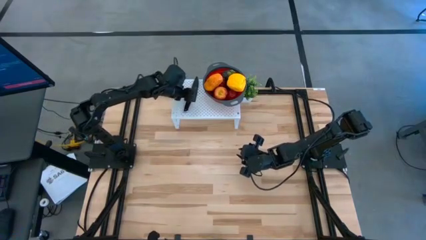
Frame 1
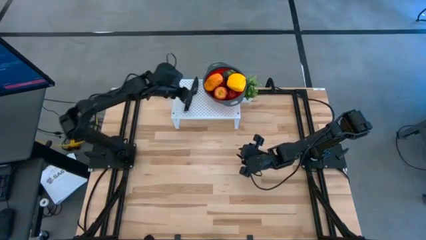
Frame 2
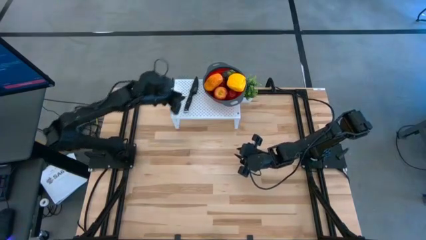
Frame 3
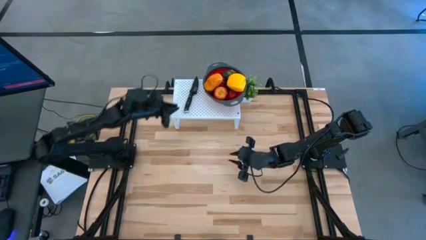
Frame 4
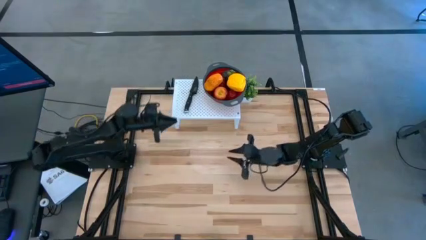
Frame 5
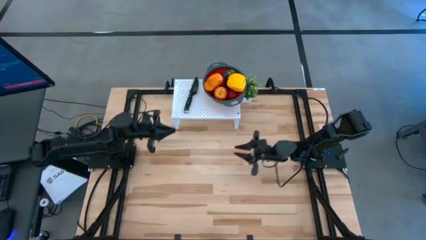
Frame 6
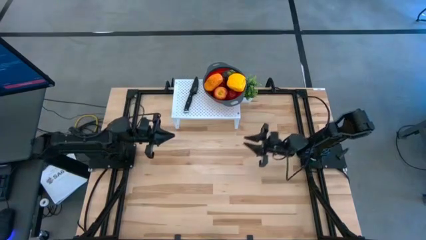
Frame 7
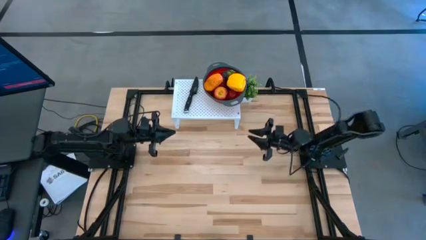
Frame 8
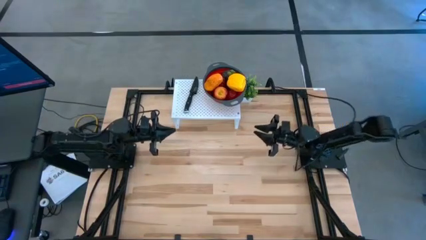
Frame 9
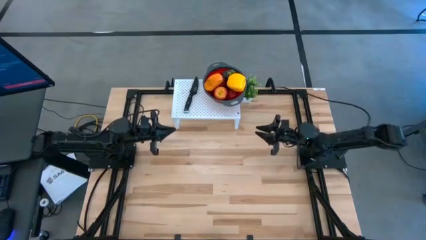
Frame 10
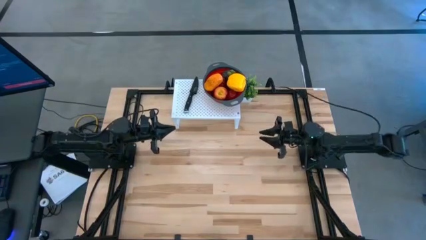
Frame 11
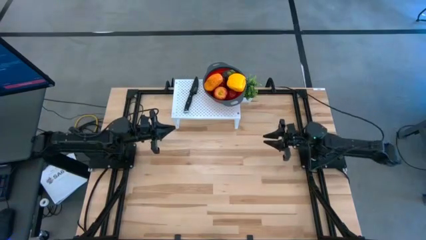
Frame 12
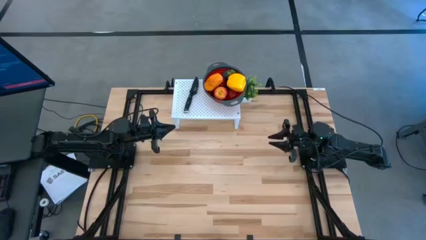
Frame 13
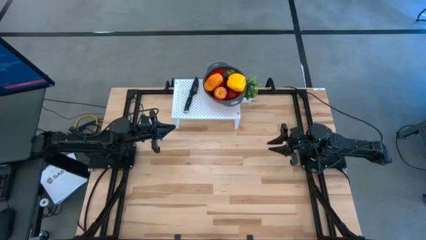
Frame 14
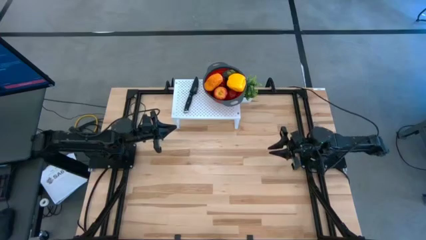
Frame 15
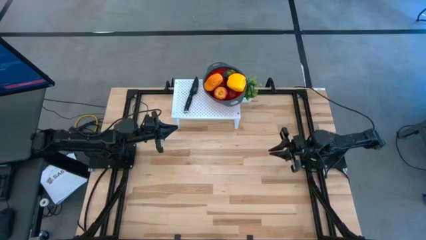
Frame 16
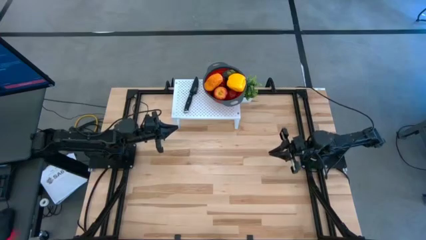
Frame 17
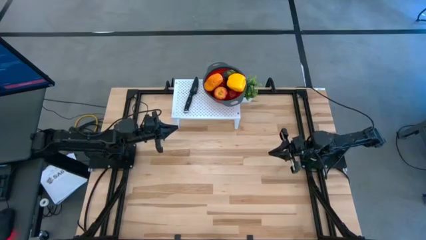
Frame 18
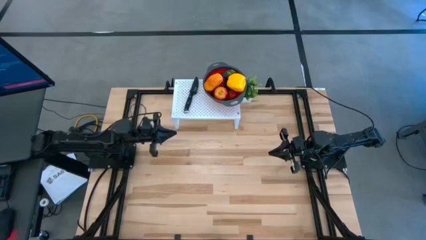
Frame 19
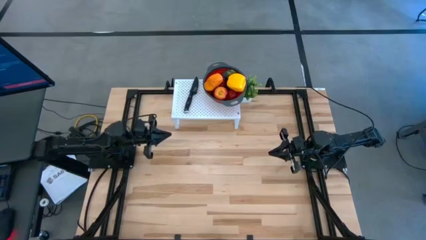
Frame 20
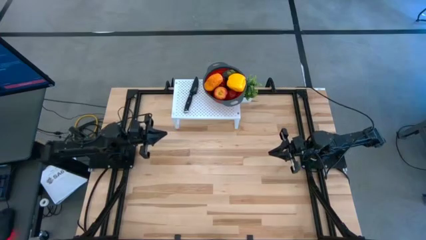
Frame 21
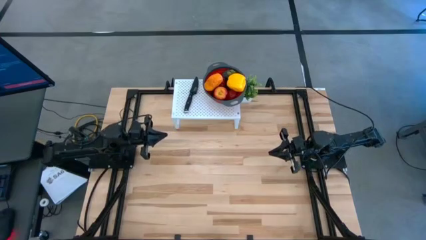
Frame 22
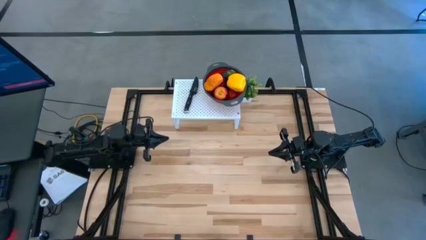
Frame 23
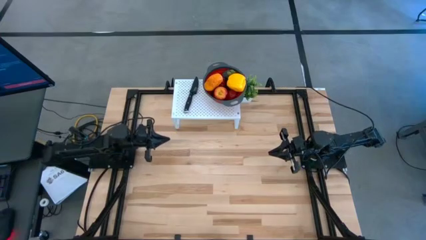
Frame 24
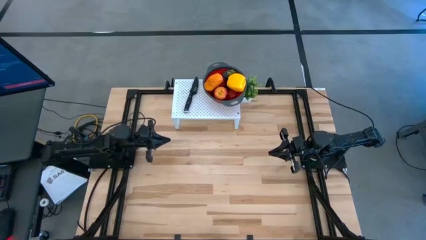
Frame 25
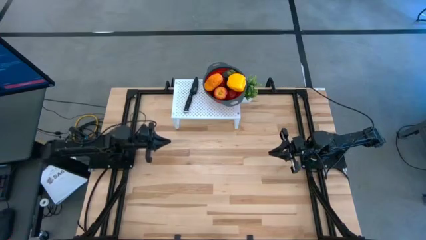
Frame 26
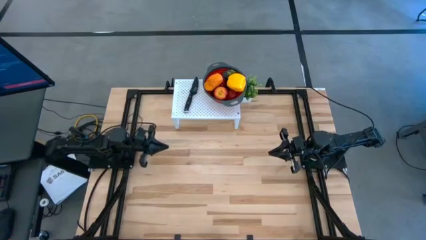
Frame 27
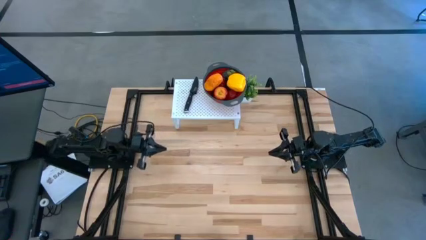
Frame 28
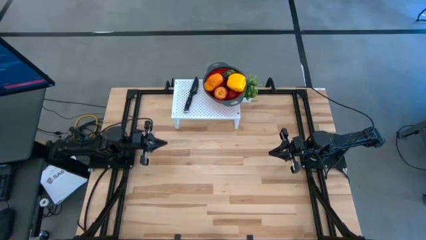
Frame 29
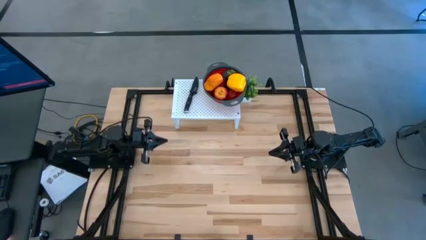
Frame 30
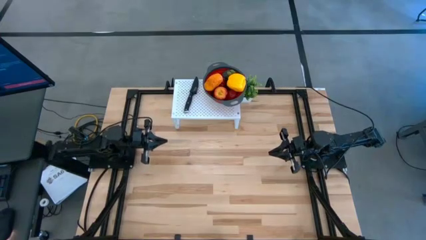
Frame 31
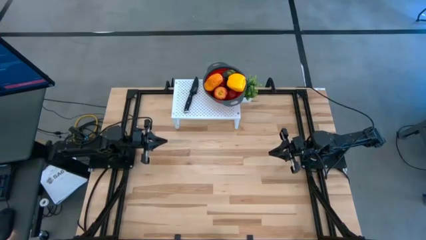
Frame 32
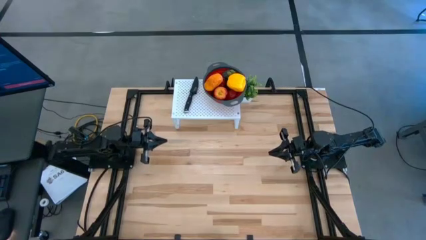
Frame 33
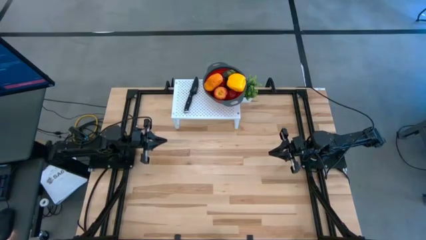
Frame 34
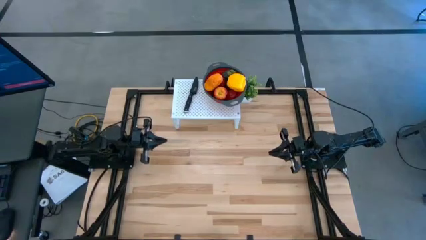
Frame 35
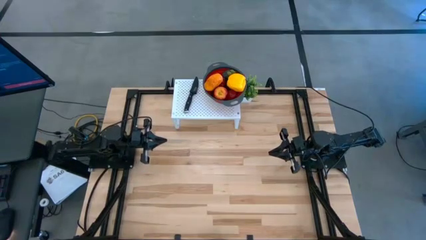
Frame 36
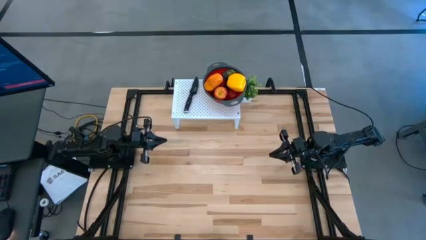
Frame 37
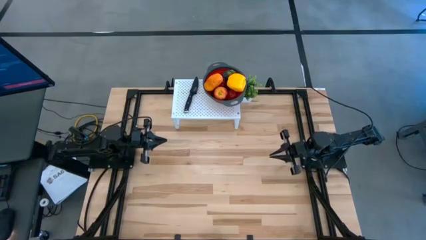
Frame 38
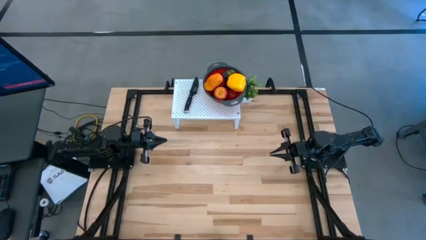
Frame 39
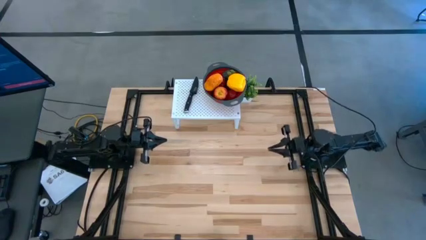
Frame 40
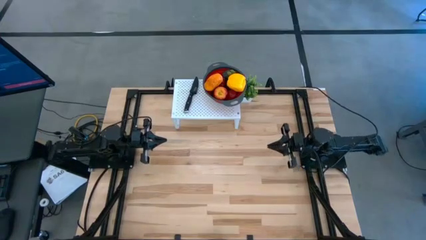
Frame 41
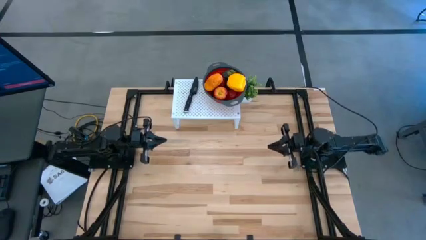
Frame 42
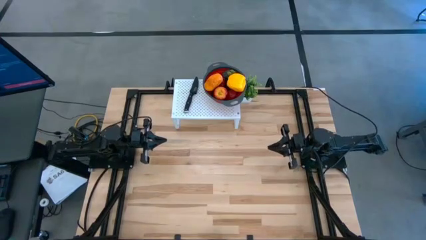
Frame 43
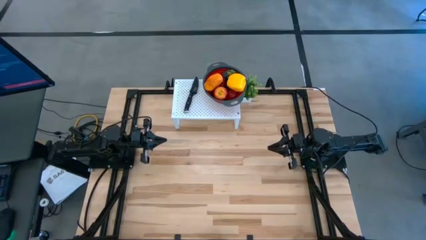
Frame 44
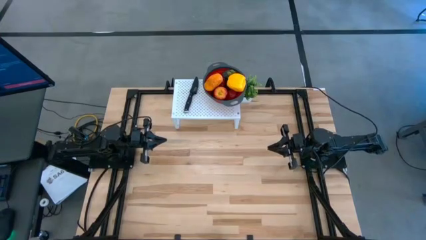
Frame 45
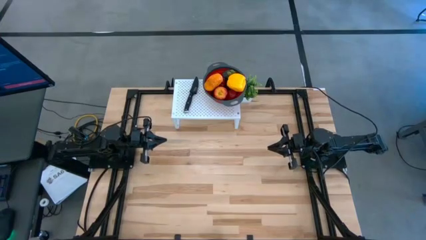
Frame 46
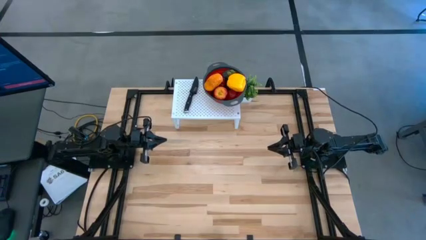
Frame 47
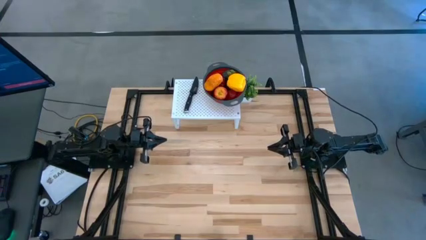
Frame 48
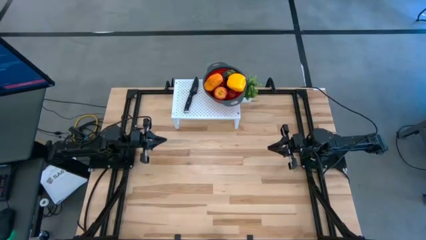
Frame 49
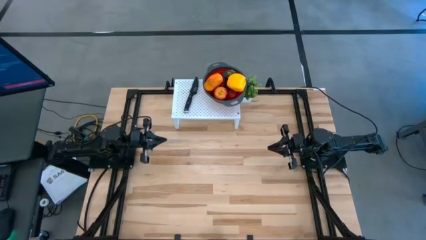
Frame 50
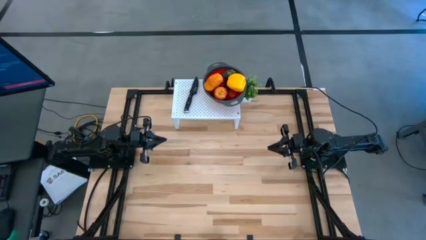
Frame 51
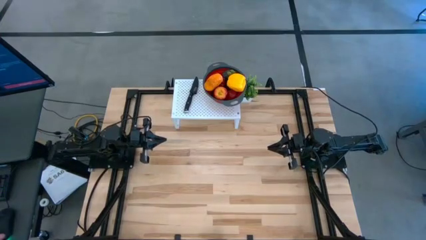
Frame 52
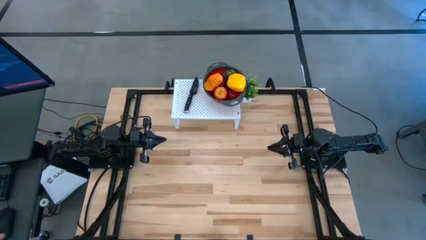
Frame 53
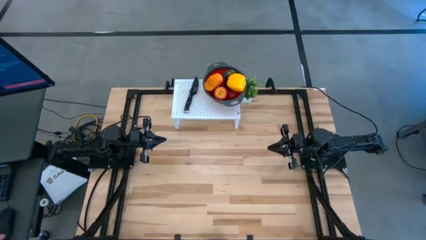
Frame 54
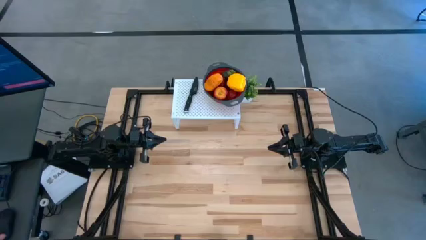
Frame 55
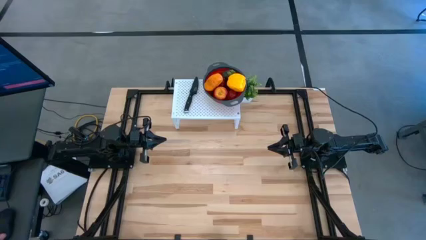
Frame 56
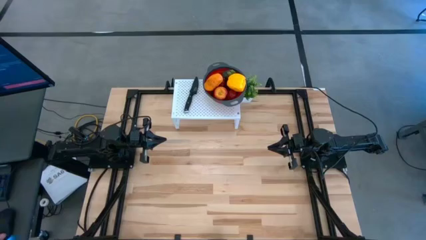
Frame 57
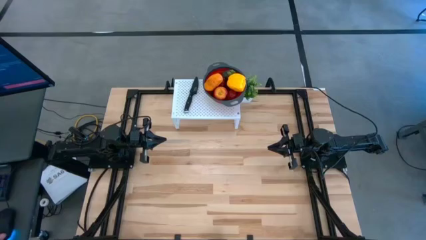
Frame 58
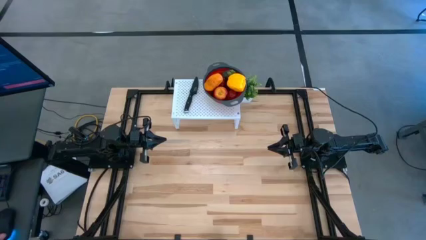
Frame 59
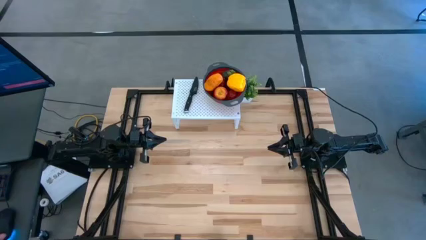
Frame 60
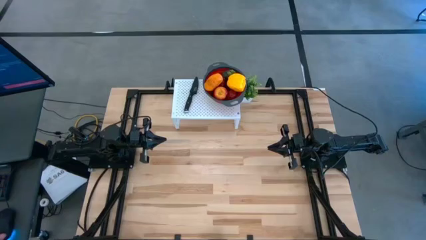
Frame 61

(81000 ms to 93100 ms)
Task: Pick & Place Fruit
Return to Home Position

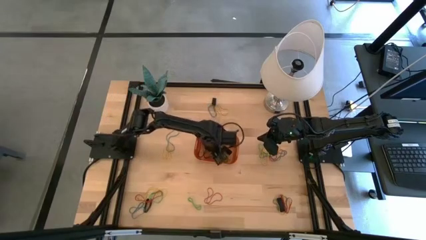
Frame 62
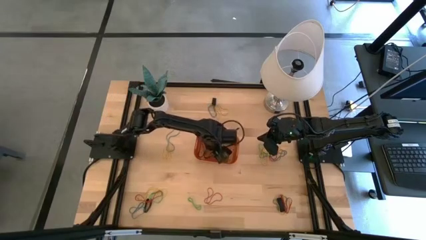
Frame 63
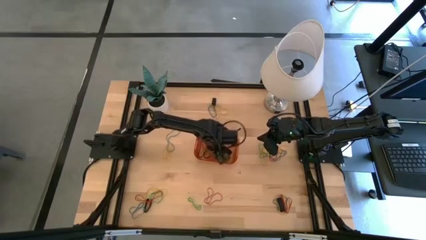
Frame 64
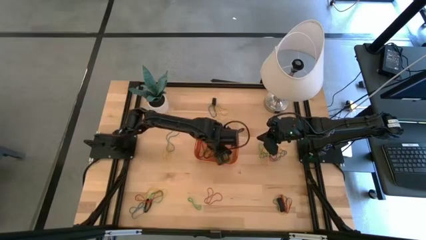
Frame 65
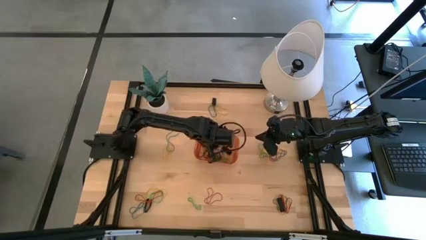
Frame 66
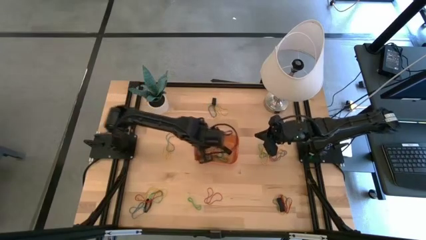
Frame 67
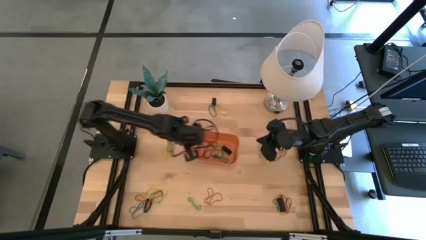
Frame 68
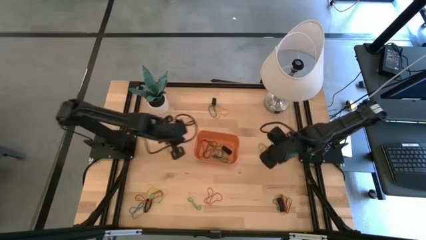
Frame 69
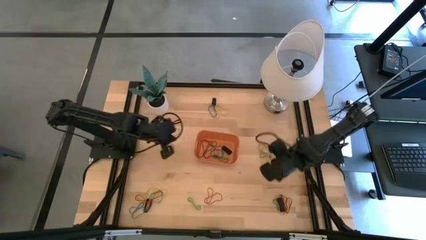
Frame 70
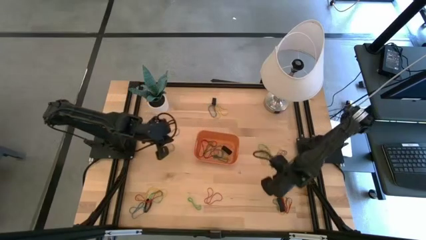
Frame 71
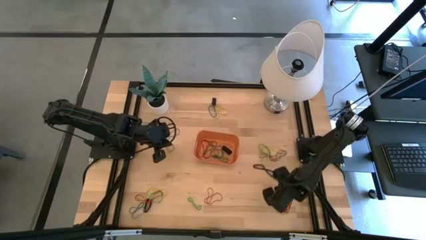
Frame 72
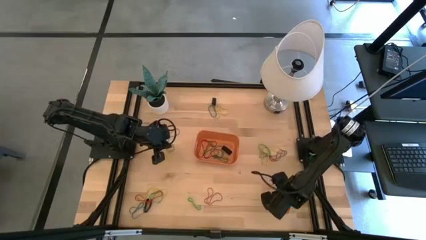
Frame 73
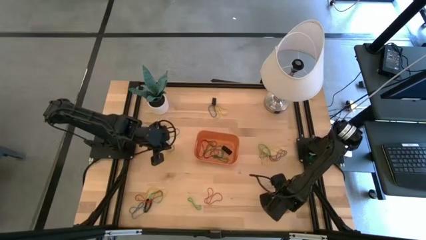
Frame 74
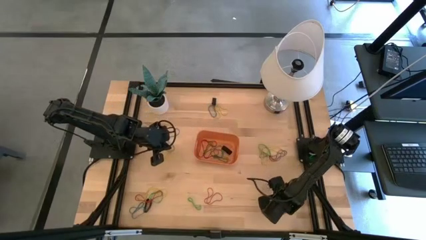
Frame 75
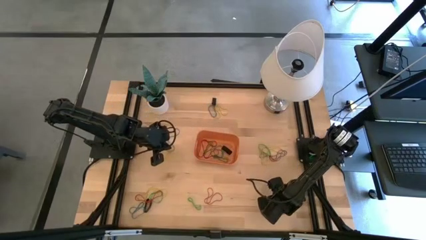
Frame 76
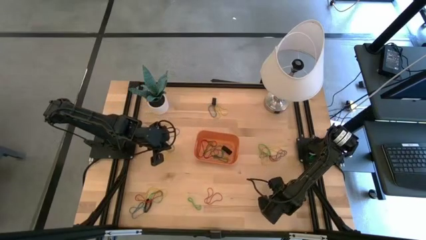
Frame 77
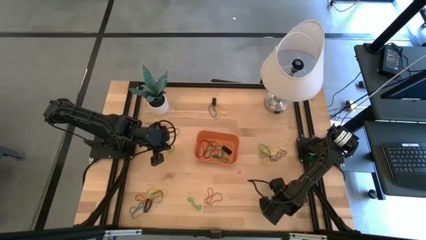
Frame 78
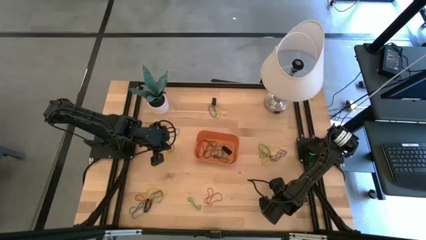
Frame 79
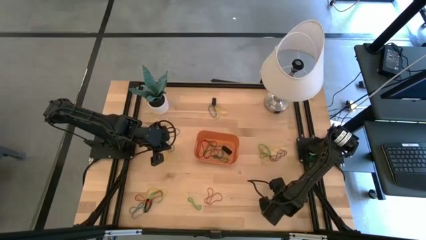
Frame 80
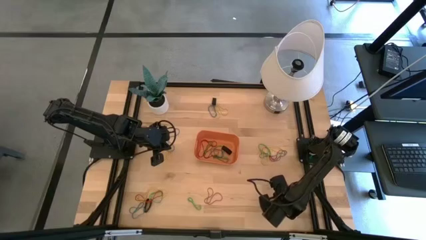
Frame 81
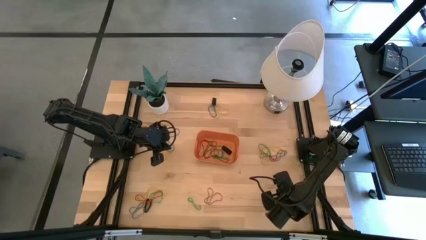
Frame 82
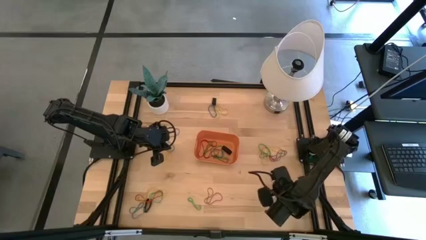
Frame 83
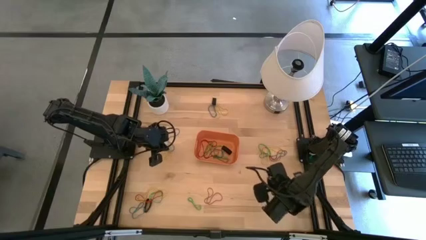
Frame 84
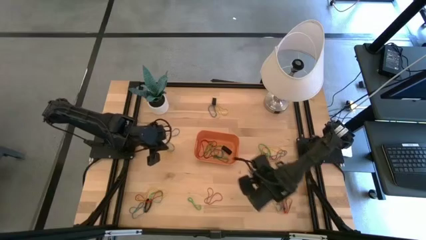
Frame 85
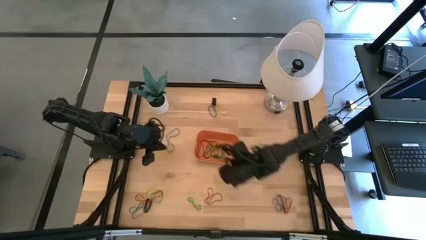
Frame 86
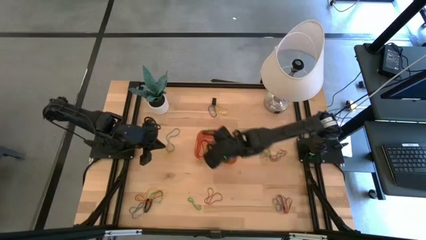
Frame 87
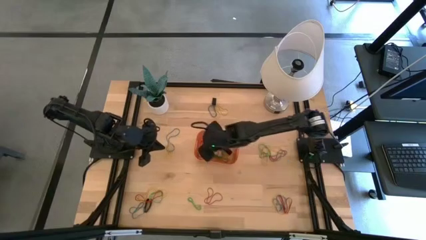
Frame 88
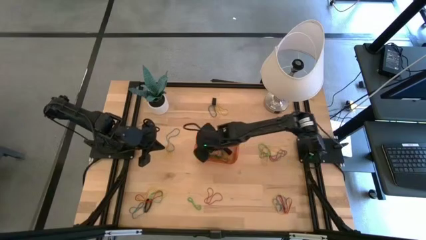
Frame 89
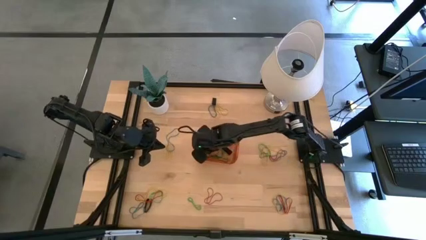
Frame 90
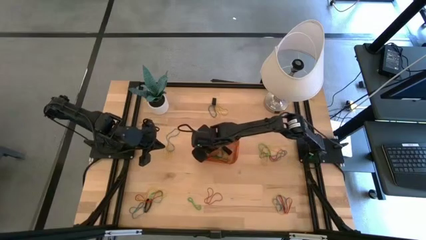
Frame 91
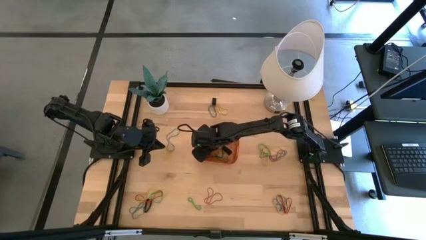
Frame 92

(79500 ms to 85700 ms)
Task: Pick and place rubber bands into bin
Put the black rubber band into the orange bin
